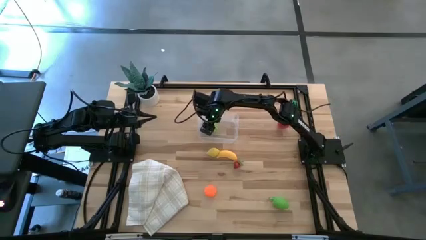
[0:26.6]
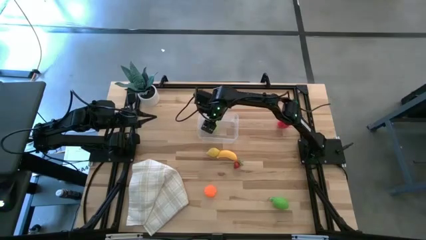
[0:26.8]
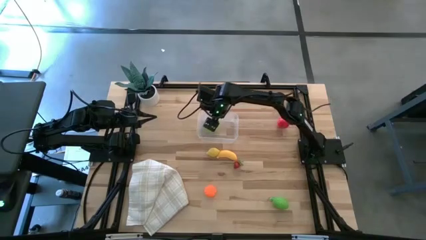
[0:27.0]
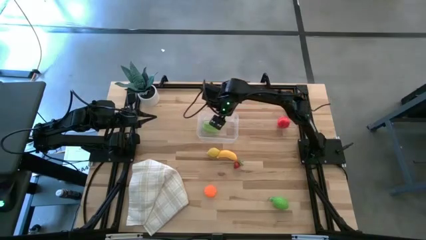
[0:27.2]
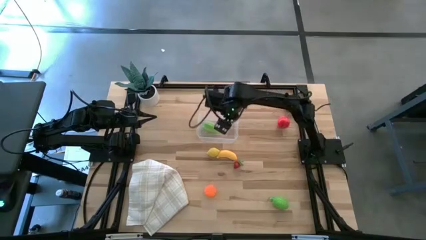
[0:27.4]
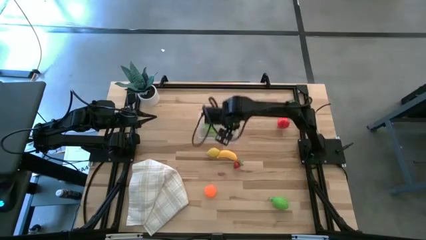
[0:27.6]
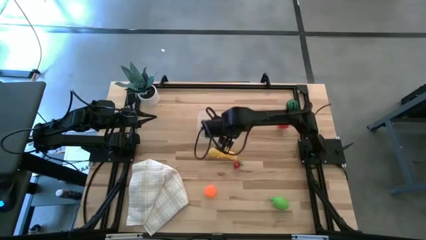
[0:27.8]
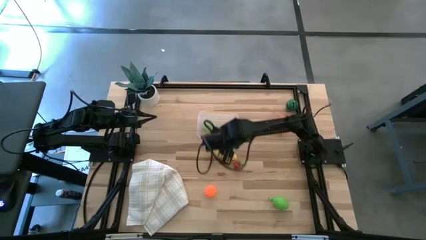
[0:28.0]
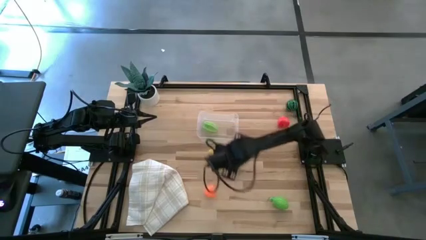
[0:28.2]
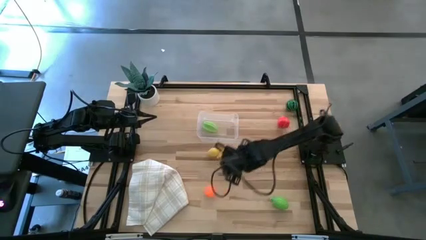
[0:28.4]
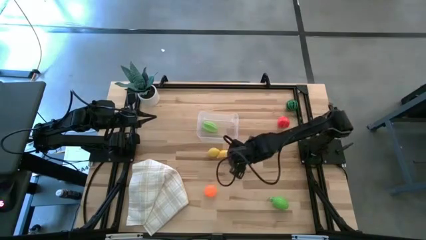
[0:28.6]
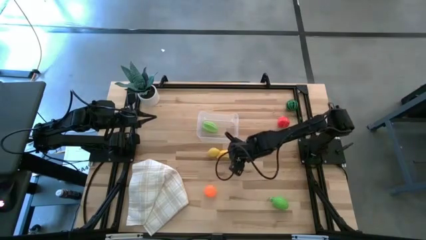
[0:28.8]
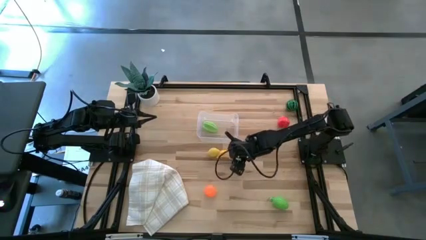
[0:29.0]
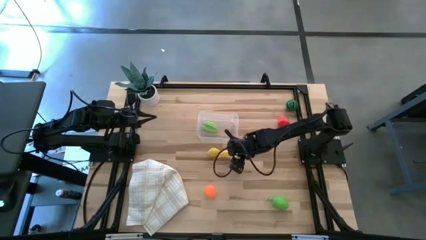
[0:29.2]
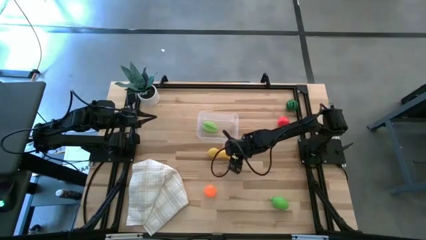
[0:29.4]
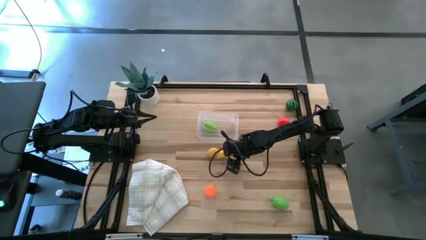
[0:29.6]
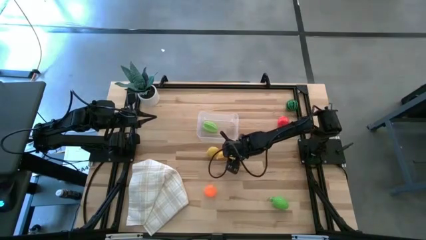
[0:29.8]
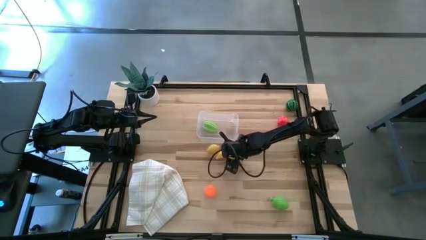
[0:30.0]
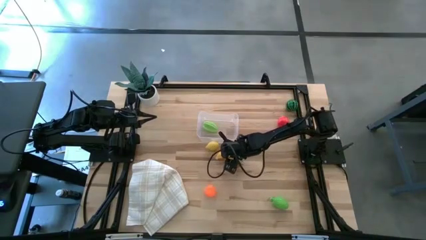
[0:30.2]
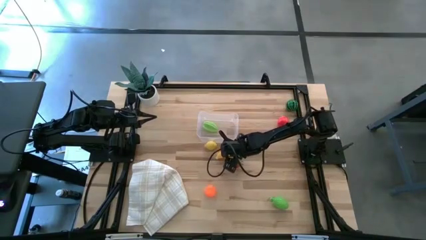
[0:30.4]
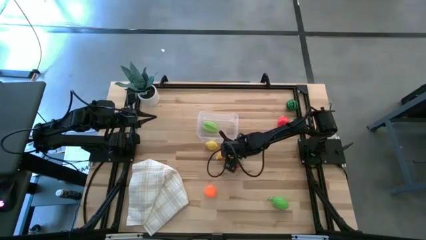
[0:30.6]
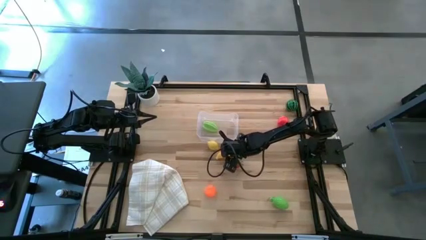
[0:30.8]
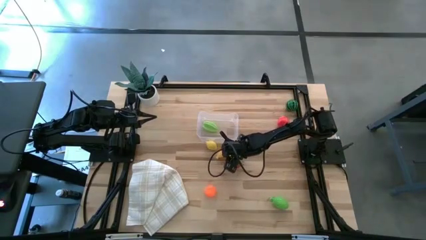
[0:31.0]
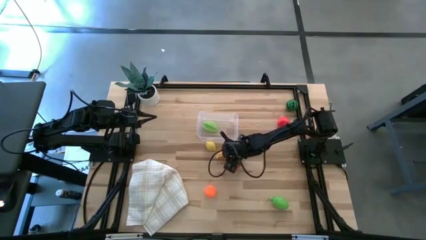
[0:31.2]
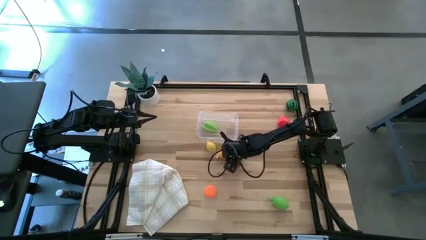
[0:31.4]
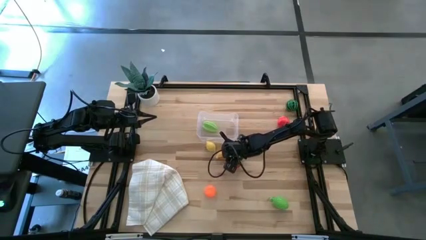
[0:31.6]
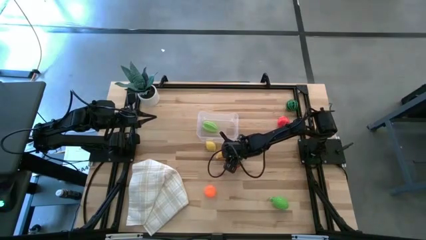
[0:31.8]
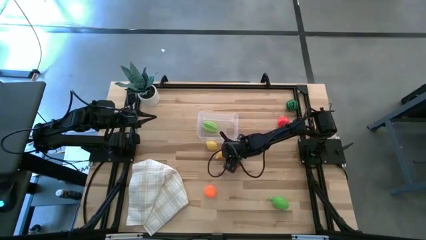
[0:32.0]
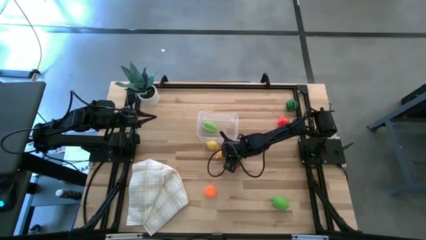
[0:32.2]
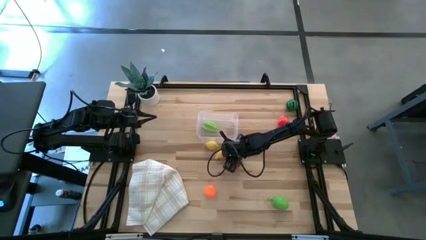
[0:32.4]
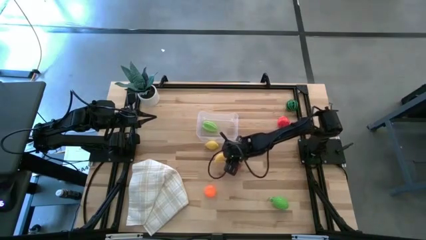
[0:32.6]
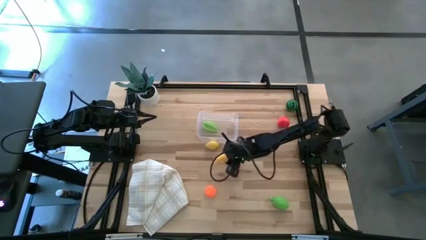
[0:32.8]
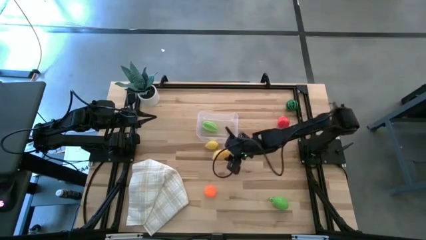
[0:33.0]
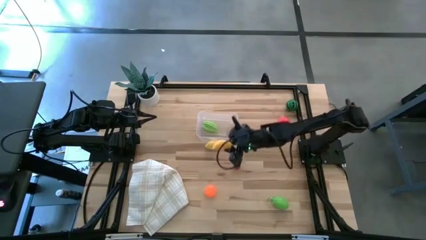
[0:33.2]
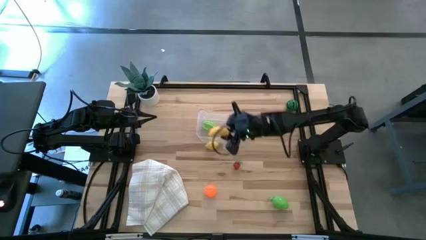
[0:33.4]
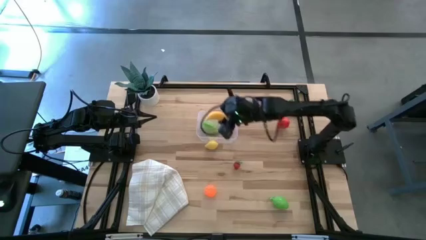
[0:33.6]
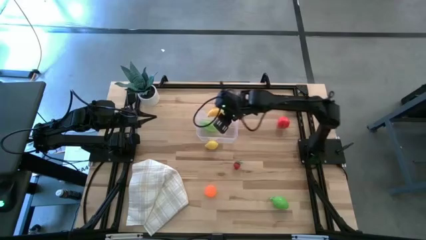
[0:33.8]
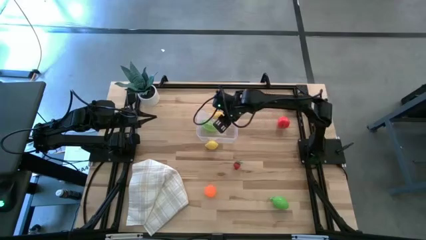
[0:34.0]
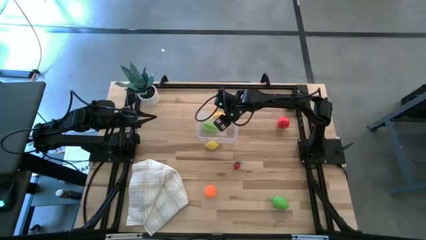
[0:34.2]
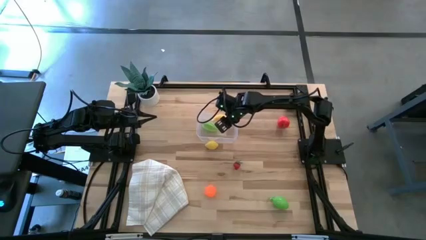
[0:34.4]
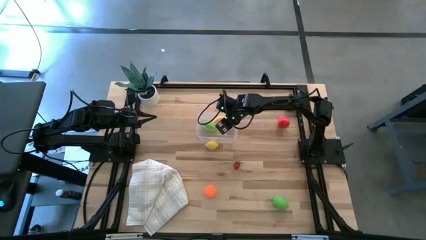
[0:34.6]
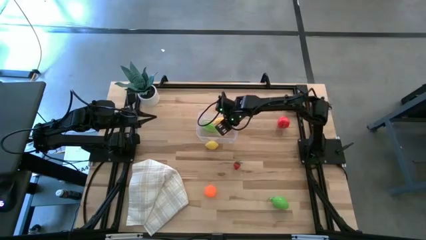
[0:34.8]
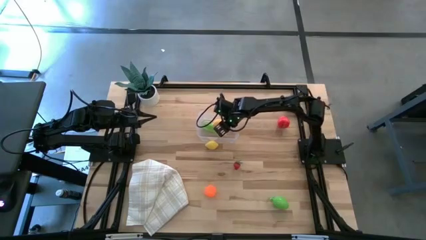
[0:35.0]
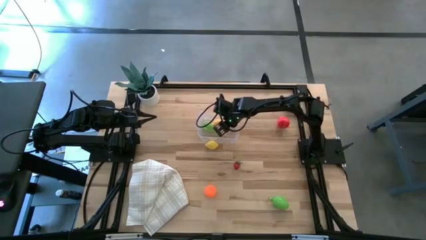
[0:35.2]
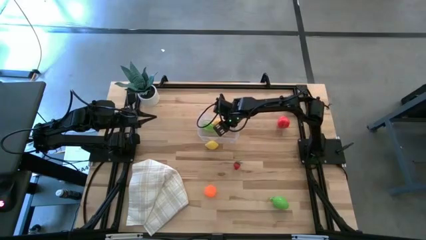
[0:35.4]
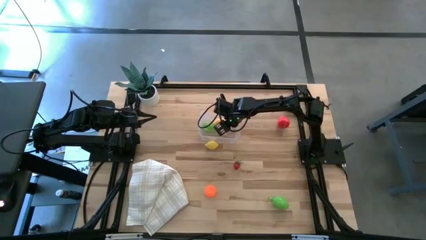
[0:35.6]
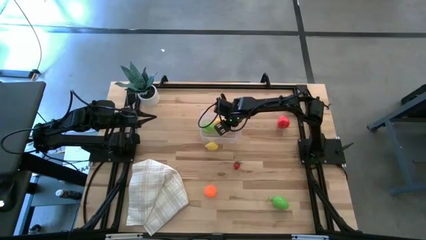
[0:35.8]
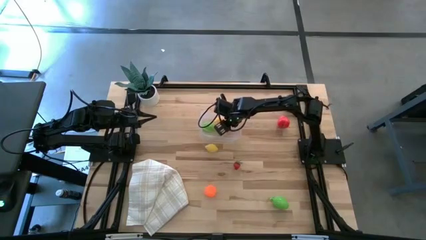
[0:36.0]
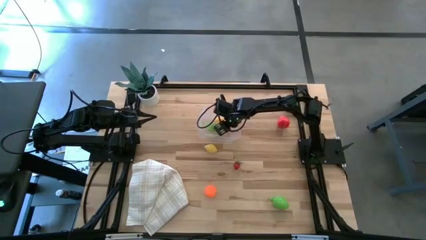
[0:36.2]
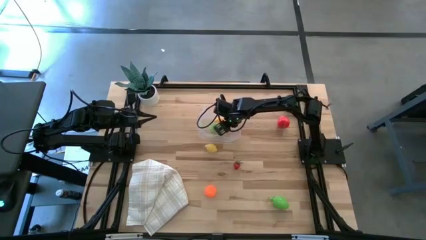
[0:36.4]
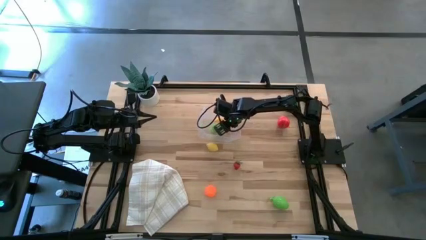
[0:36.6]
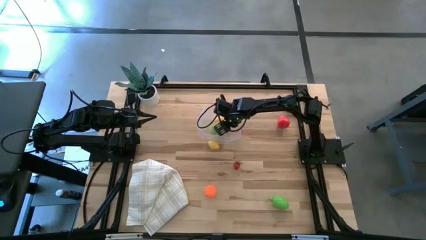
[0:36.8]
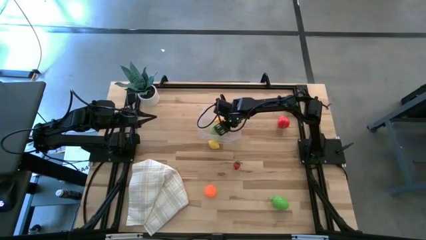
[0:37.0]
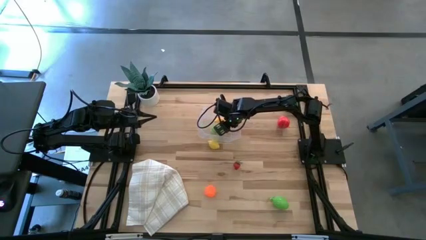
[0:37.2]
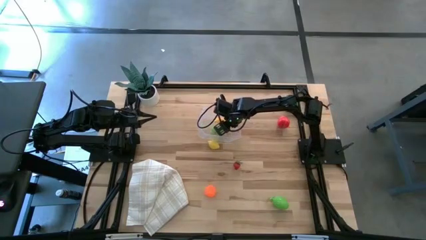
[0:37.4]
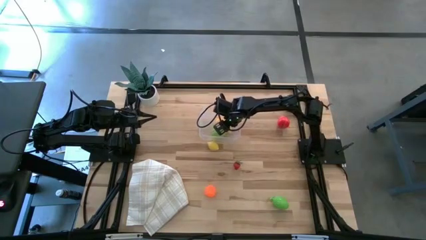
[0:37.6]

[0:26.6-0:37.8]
Task: Pick and placing Produce into tupperware
Put the banana into the transparent bin
